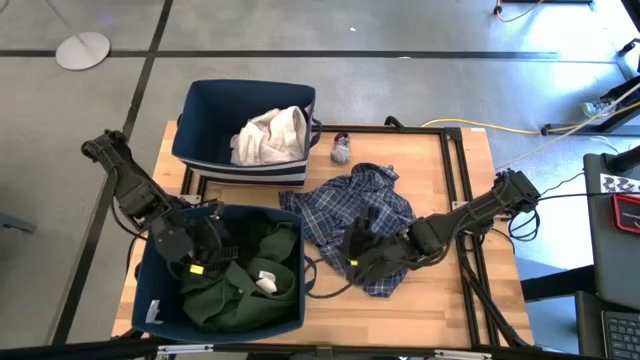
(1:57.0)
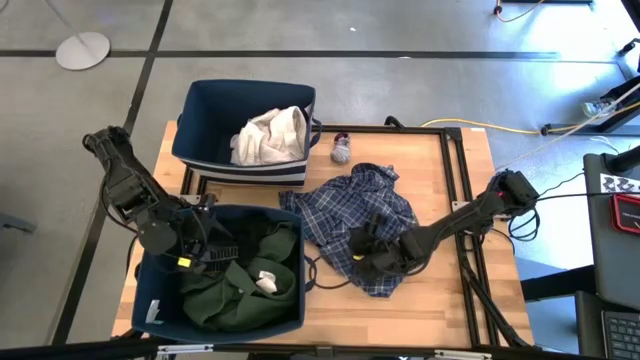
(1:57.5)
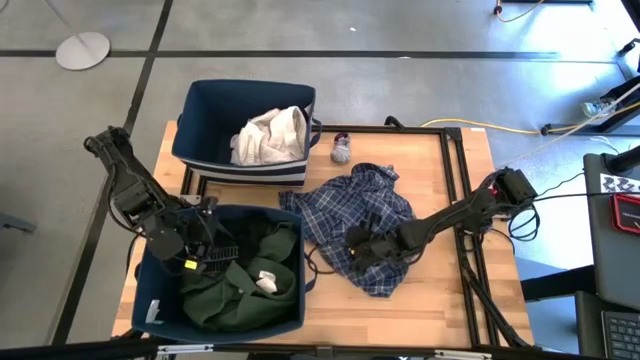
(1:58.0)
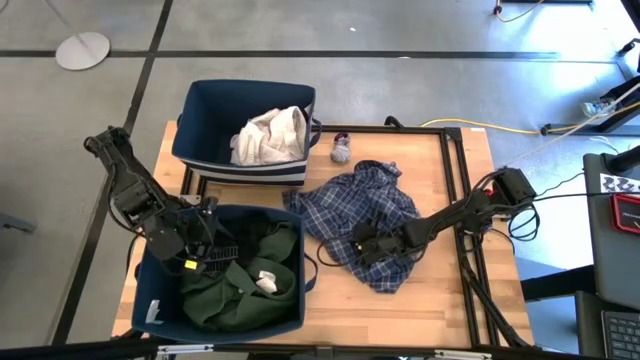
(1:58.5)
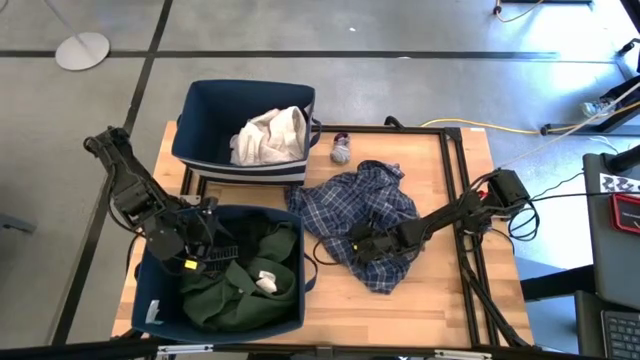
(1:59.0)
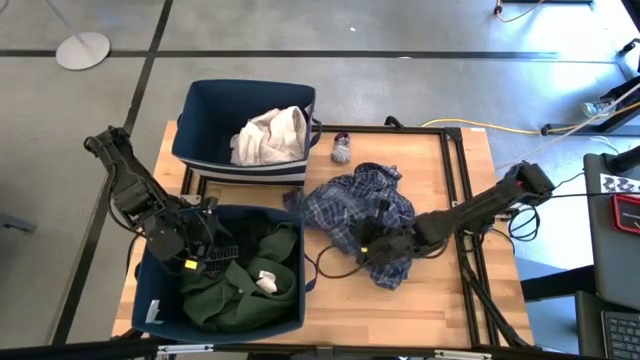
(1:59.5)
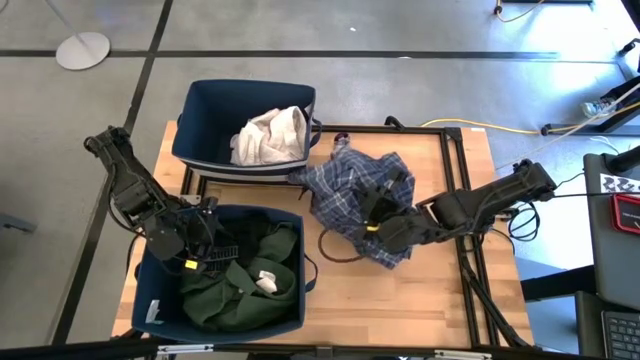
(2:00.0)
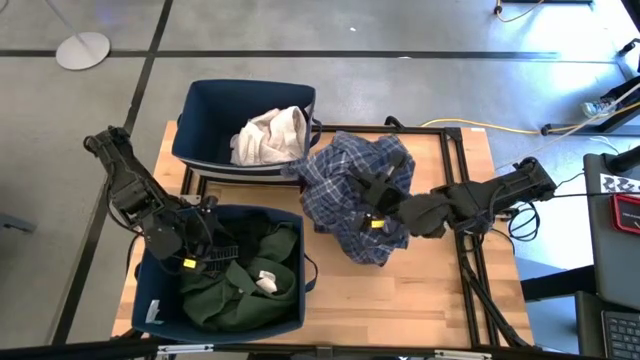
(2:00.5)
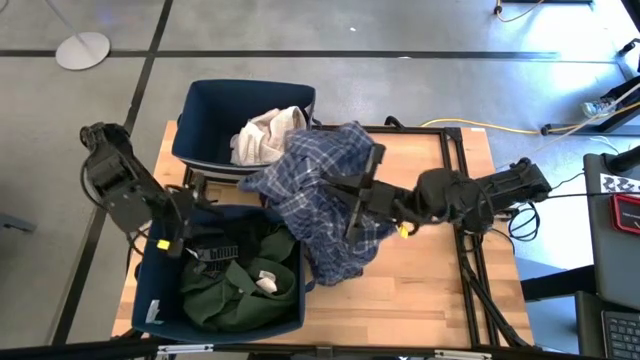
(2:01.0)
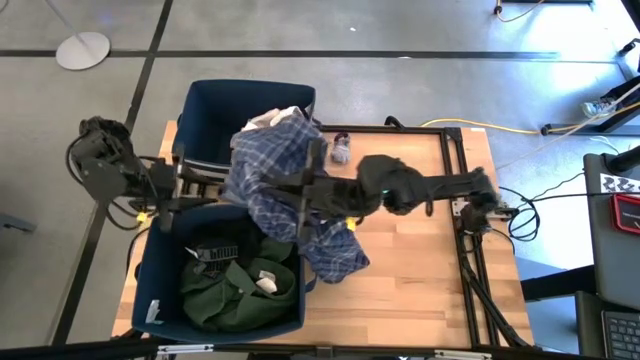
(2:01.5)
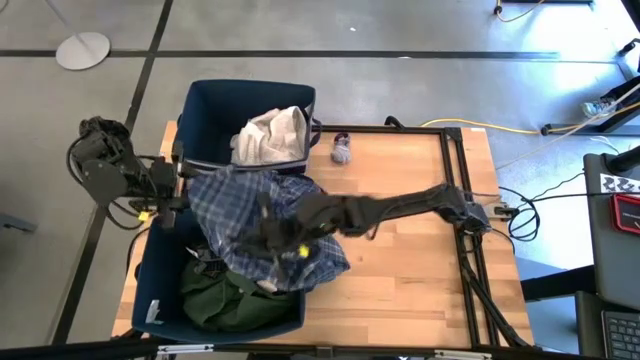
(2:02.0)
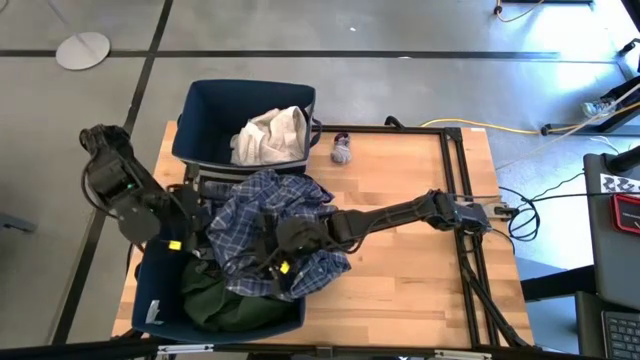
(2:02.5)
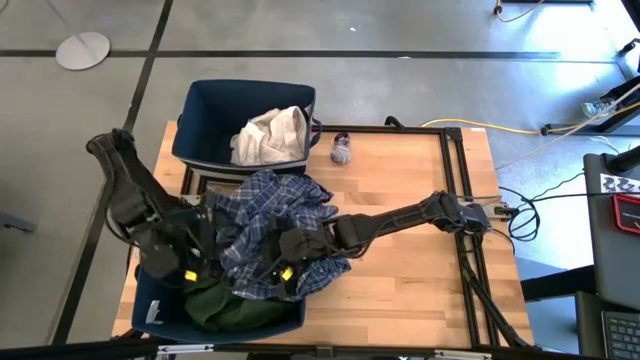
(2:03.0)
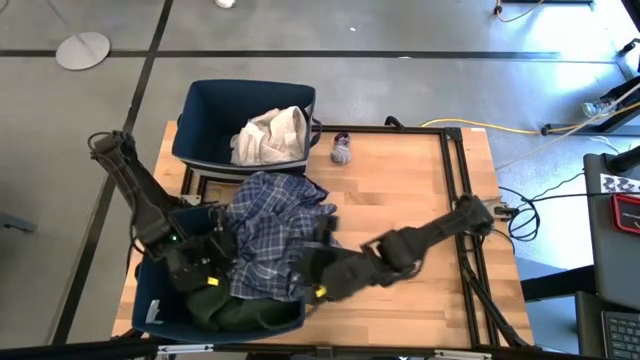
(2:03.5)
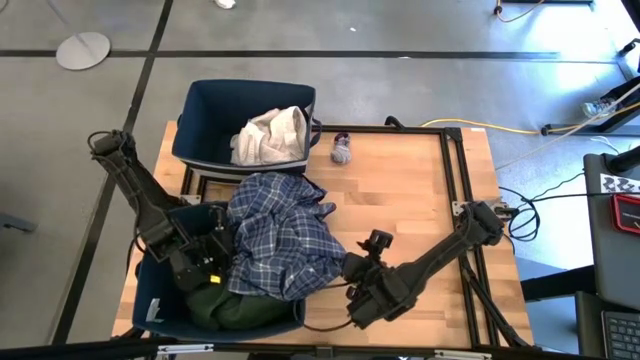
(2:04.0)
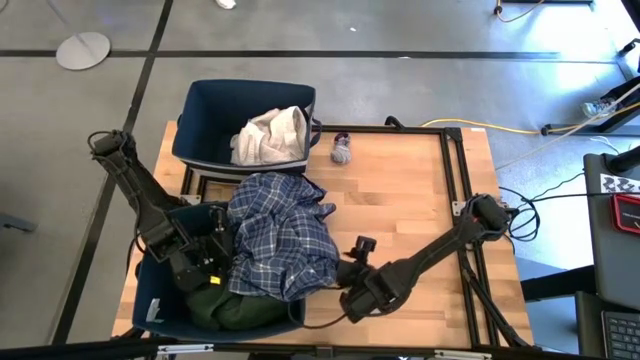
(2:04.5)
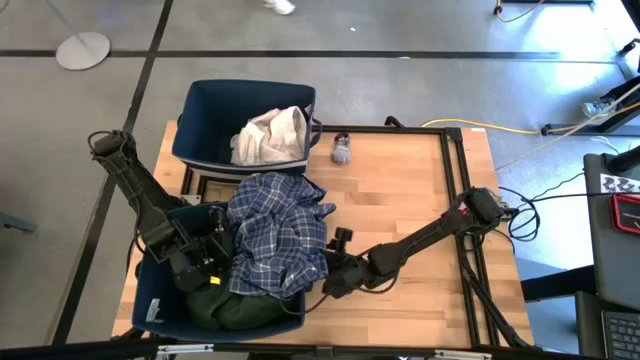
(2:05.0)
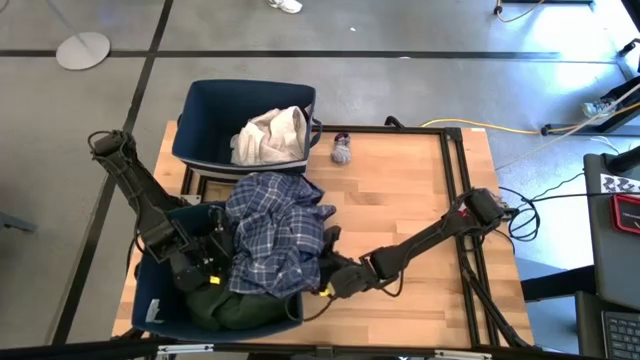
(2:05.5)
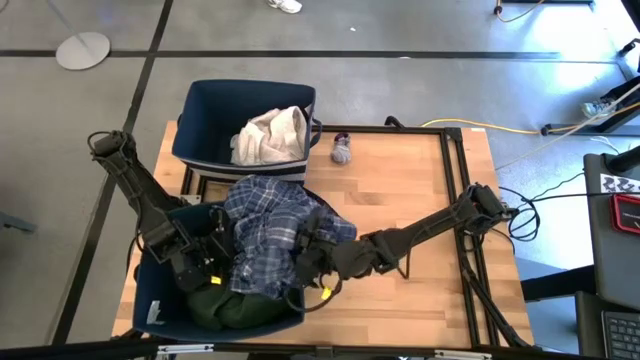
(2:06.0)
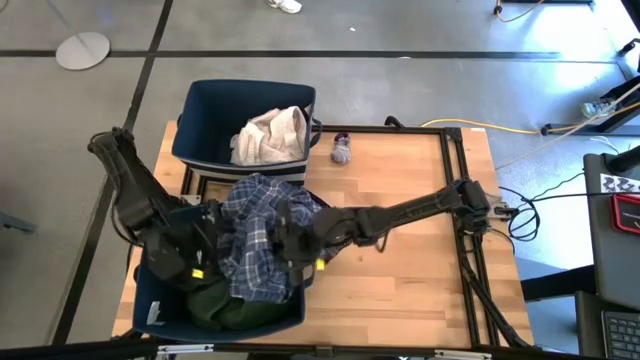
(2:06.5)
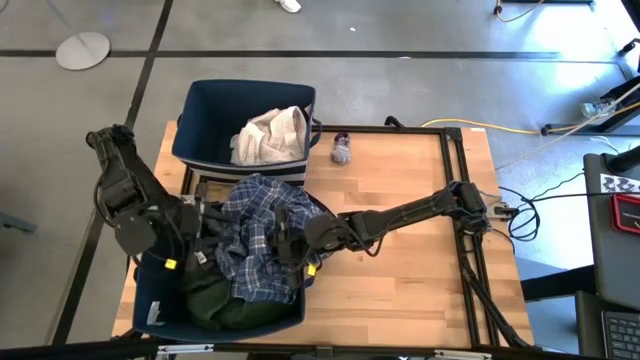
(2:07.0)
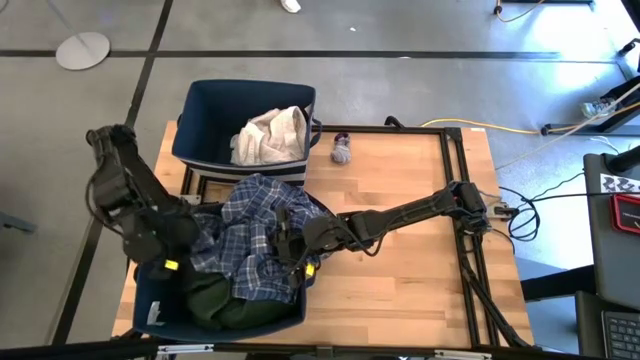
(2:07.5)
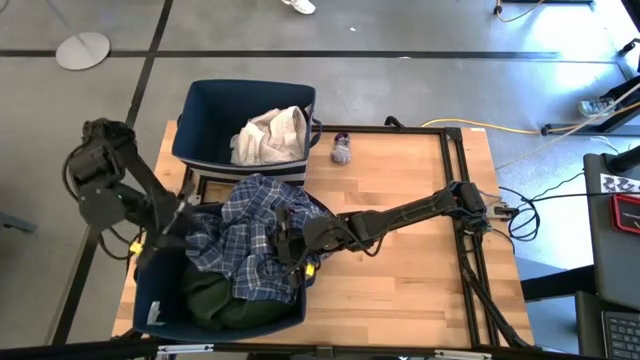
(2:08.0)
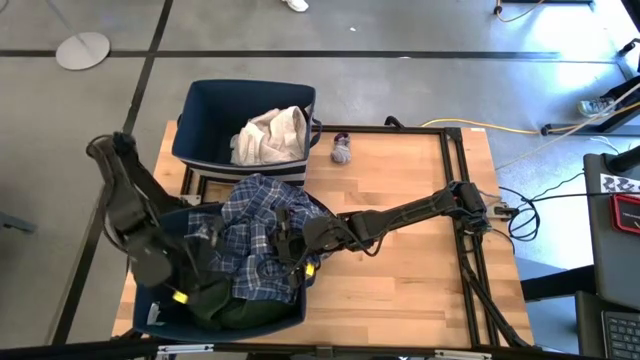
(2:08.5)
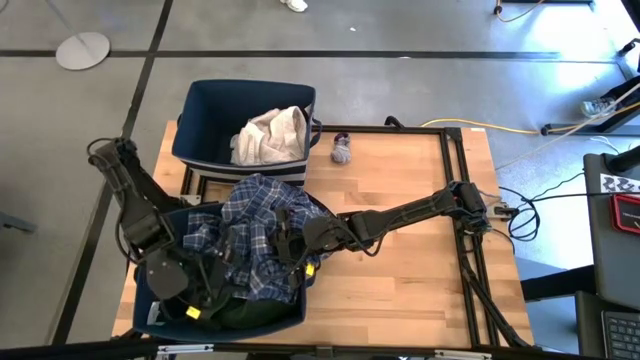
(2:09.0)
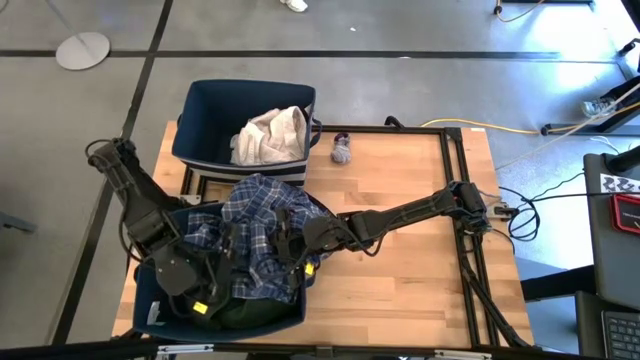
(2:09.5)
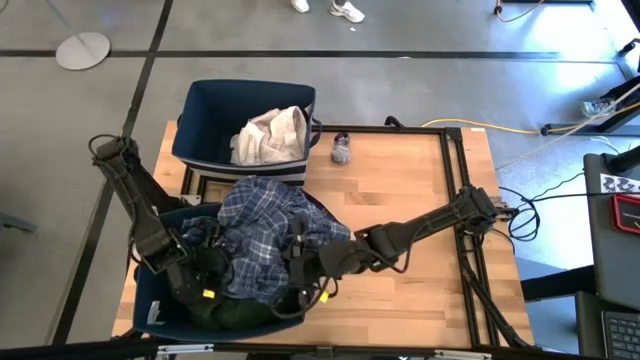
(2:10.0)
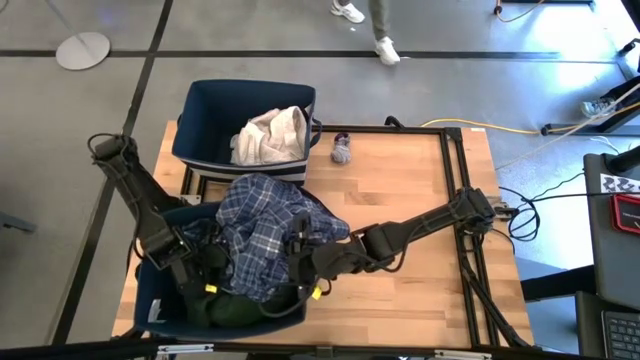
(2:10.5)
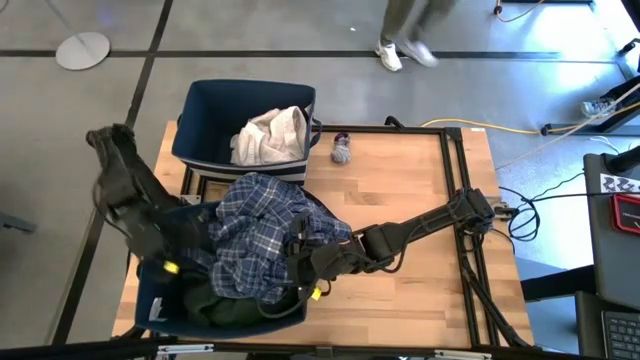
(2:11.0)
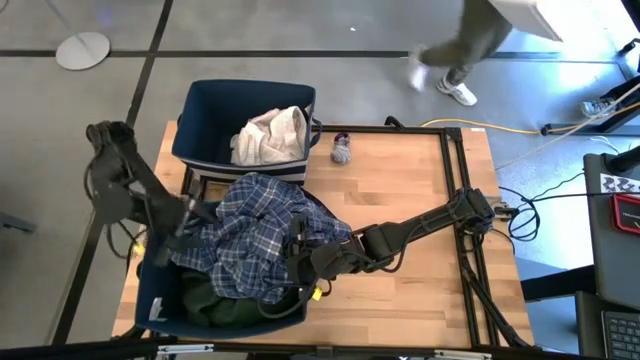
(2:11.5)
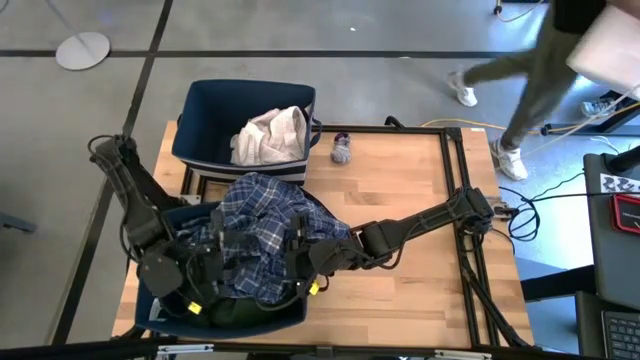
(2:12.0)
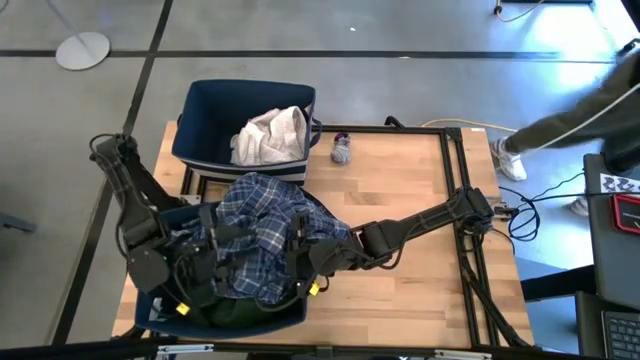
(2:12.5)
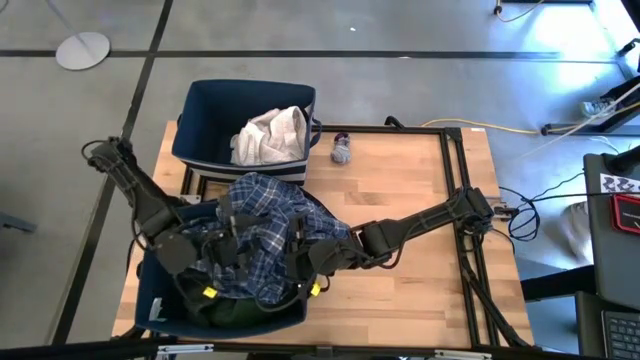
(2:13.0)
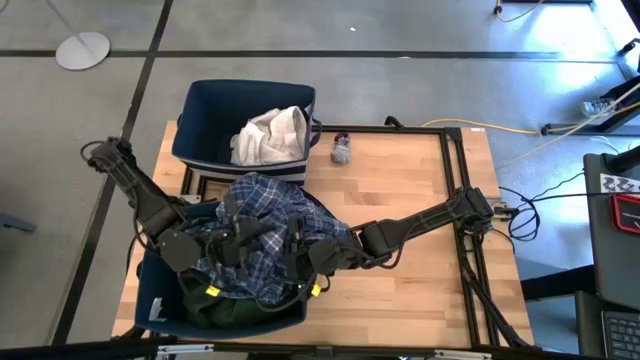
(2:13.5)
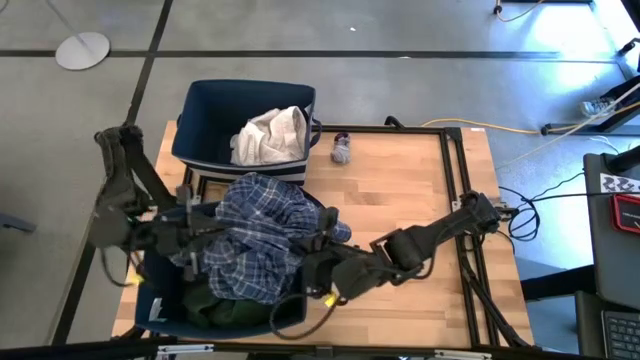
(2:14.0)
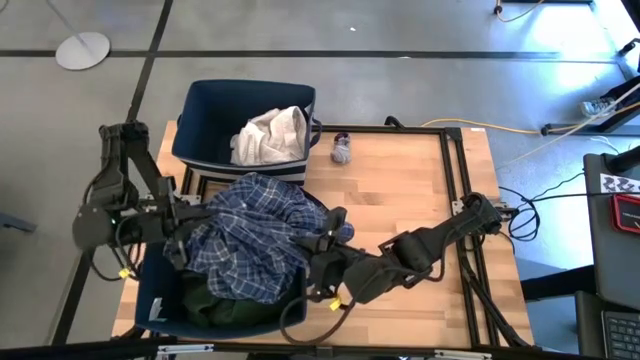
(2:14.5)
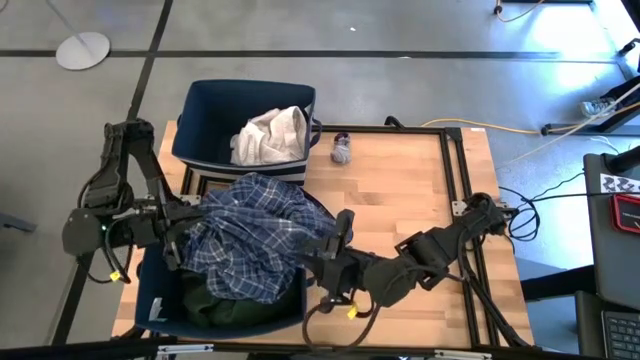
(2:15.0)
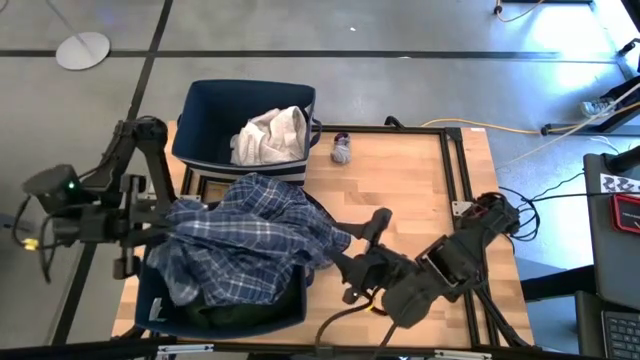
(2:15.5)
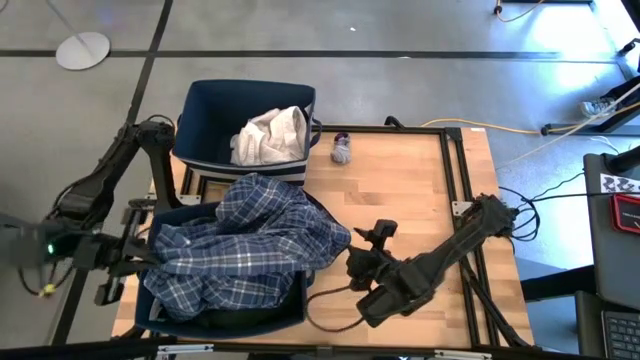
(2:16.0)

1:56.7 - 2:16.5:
Task: Sort clothes
Put the blue checkered long sleeve into the bottom blue laundry organizer
